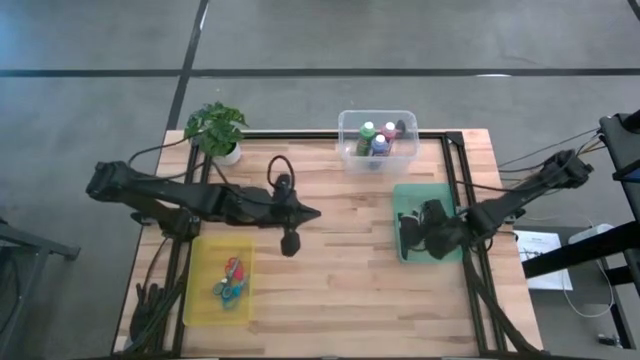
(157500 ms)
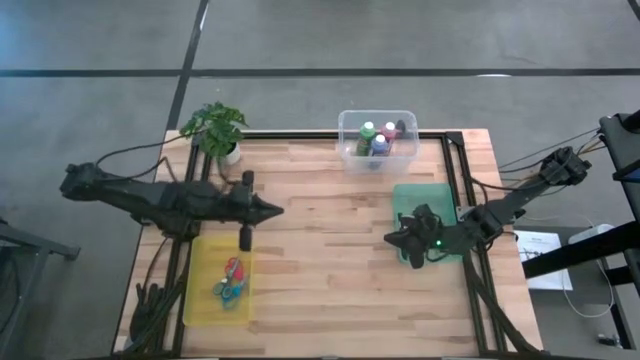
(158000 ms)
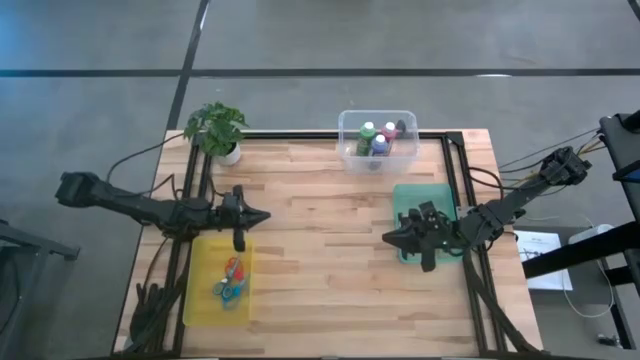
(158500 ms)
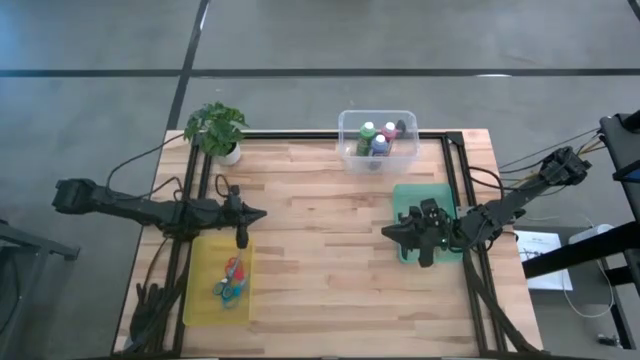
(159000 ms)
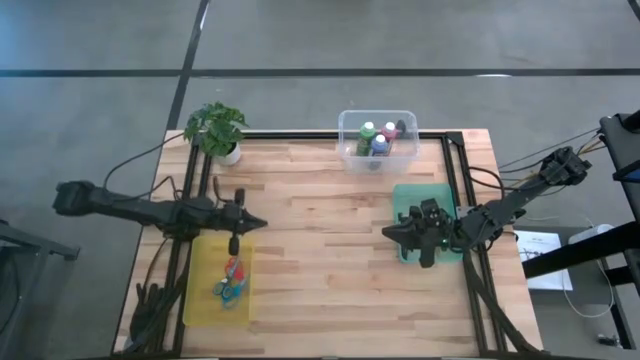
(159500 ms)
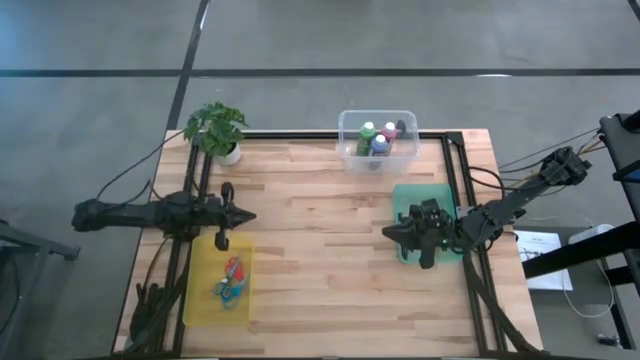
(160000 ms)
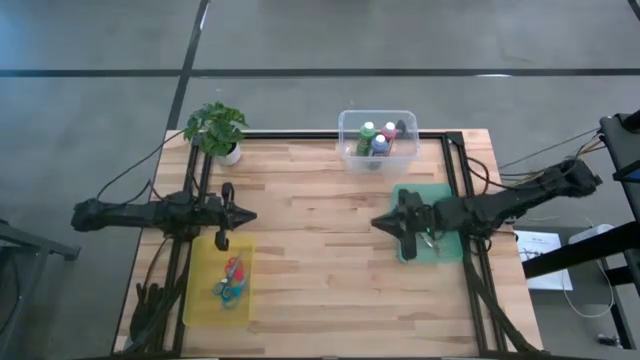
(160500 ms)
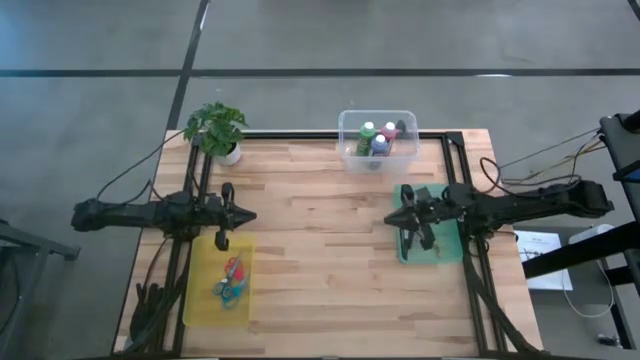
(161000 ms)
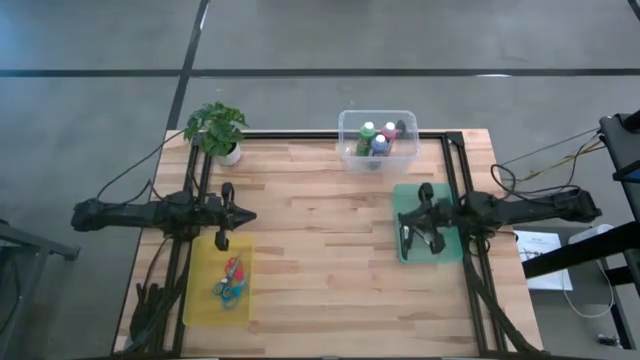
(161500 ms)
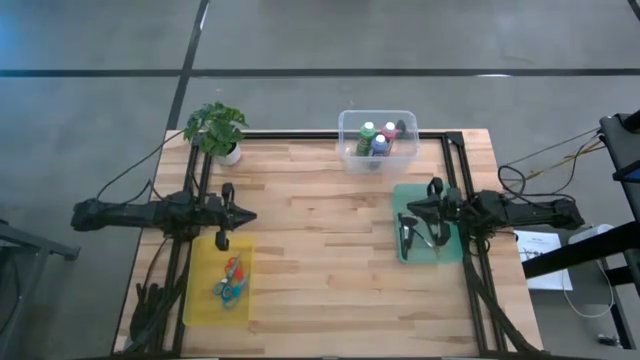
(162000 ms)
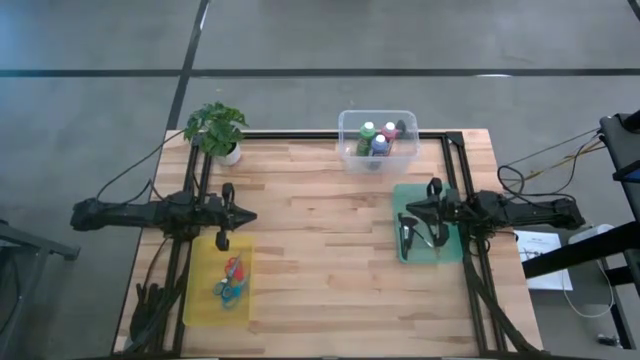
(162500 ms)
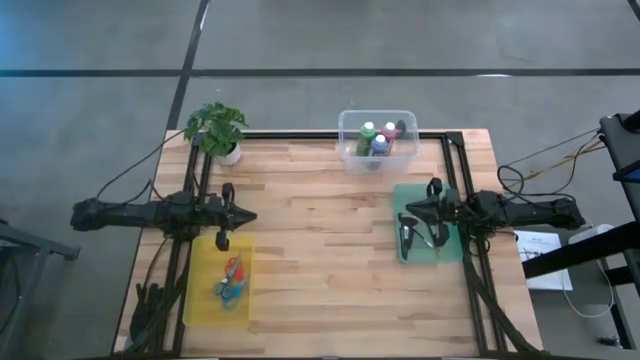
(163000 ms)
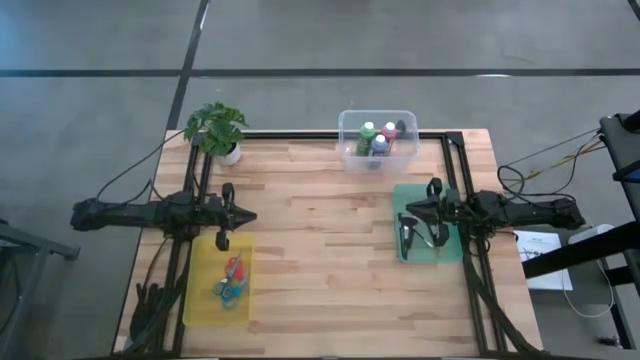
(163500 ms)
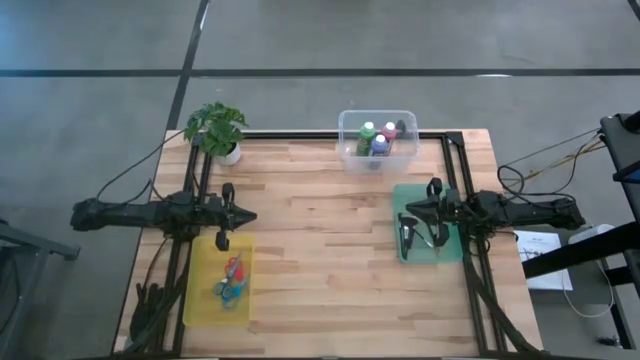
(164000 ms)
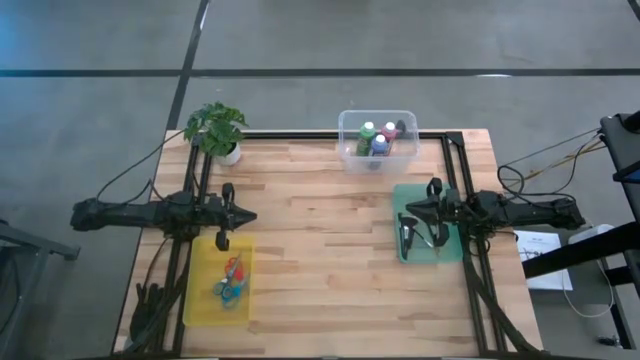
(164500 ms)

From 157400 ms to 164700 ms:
Task: Pick & Place Paint Supplies
Return to Home Position

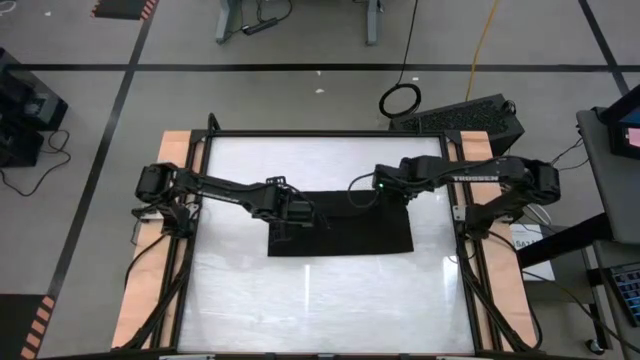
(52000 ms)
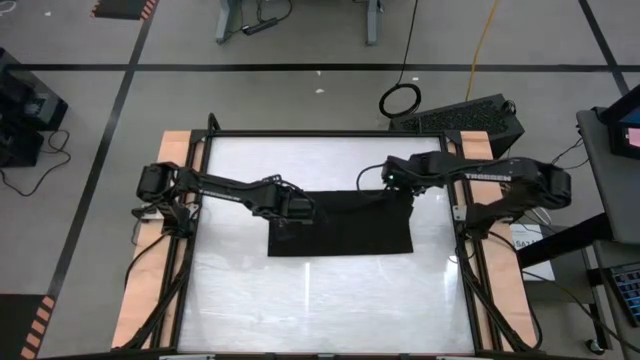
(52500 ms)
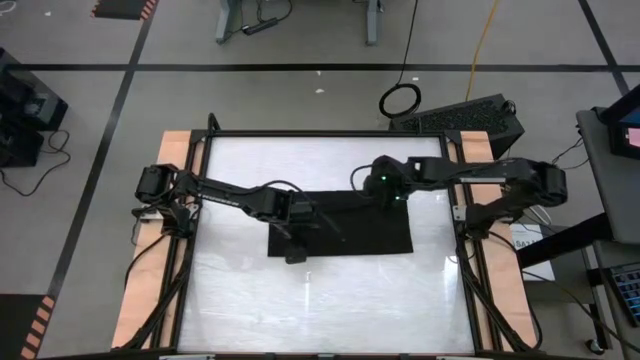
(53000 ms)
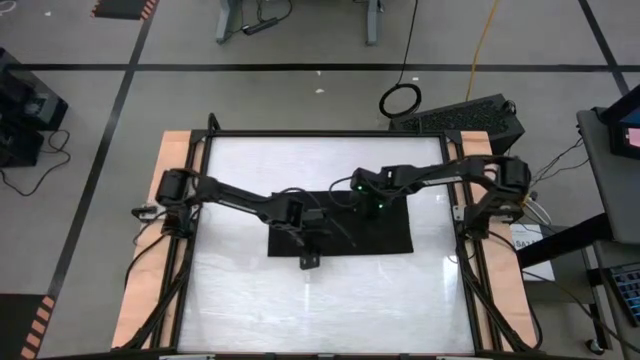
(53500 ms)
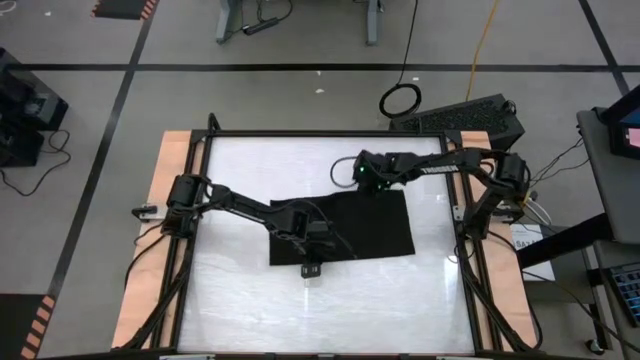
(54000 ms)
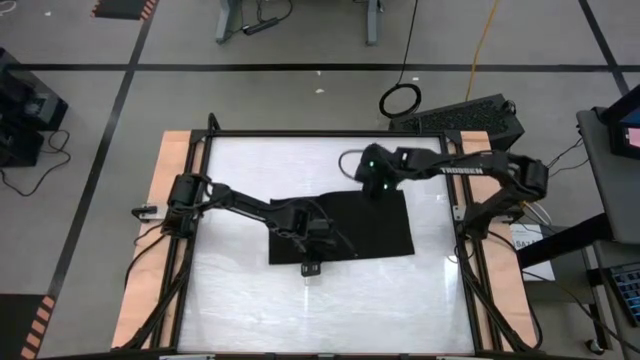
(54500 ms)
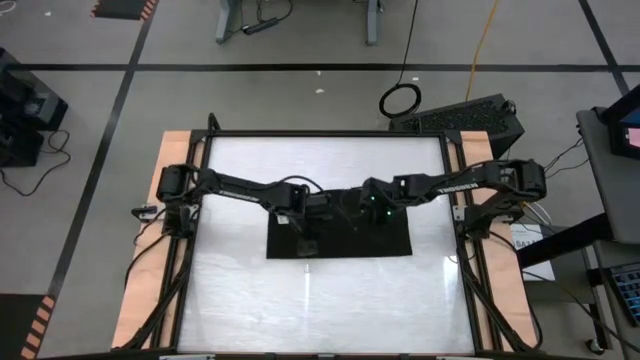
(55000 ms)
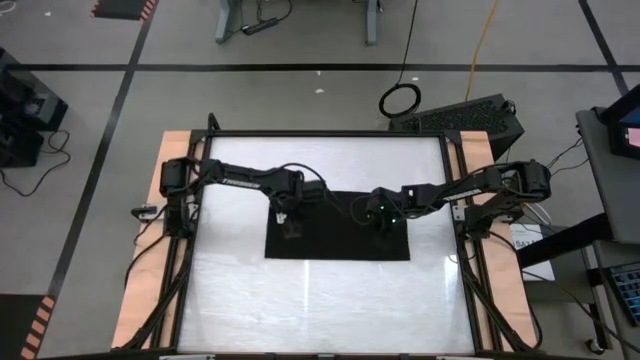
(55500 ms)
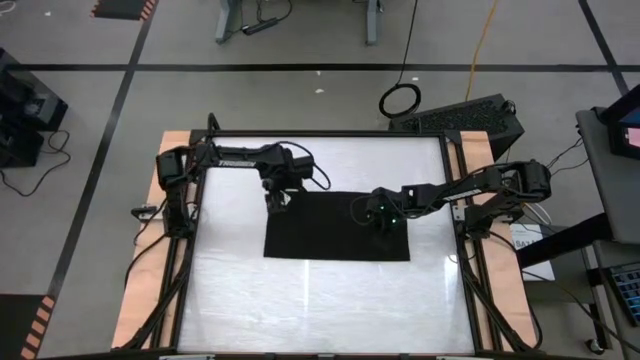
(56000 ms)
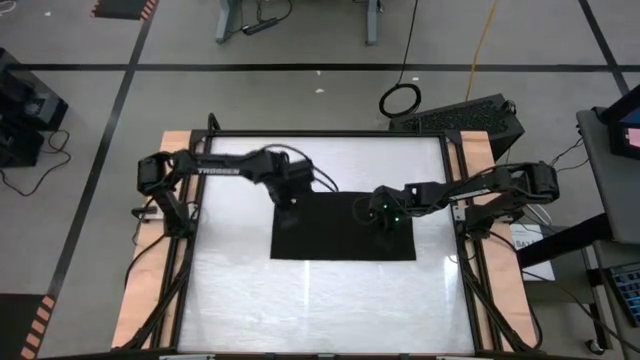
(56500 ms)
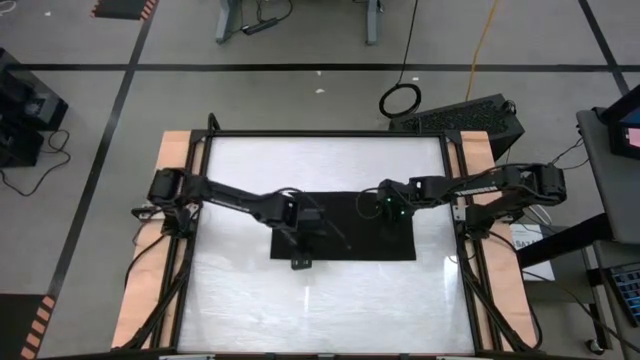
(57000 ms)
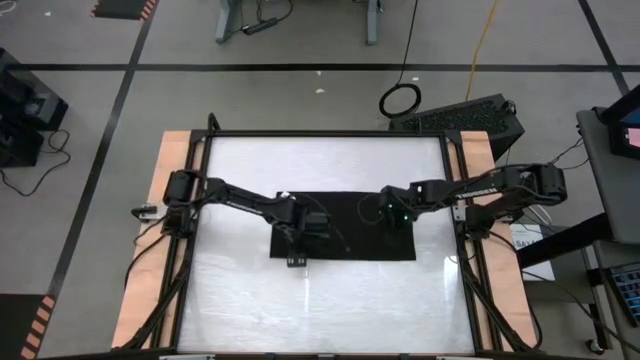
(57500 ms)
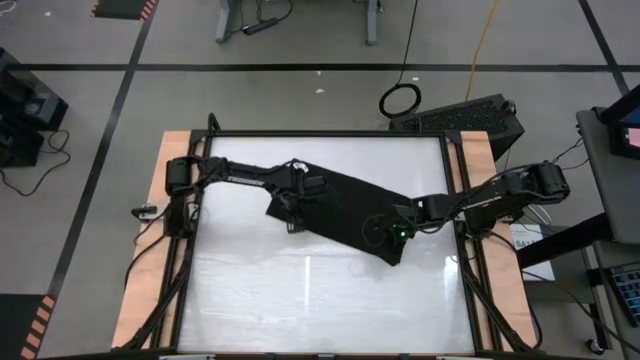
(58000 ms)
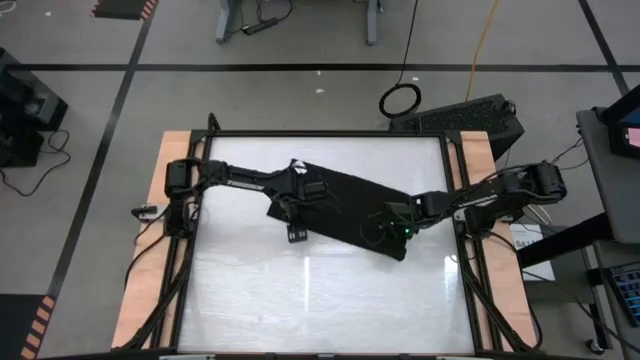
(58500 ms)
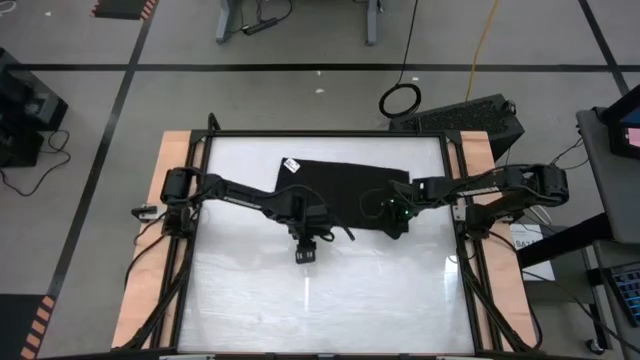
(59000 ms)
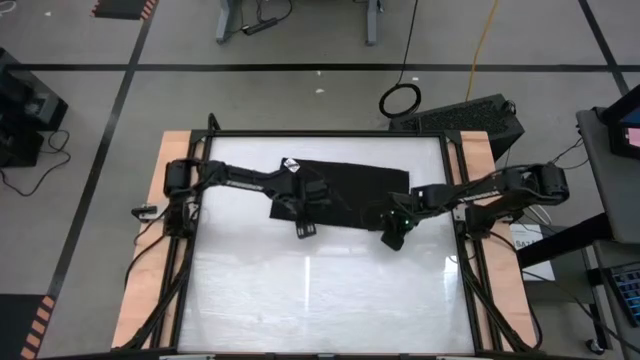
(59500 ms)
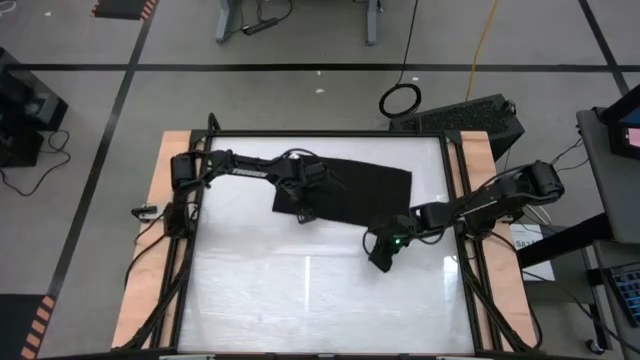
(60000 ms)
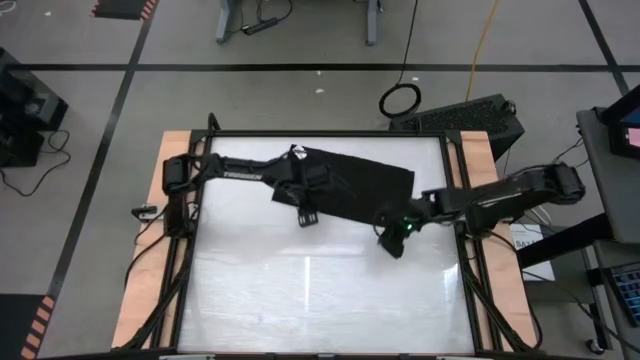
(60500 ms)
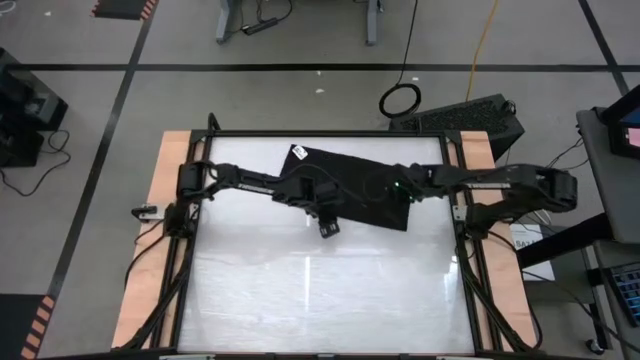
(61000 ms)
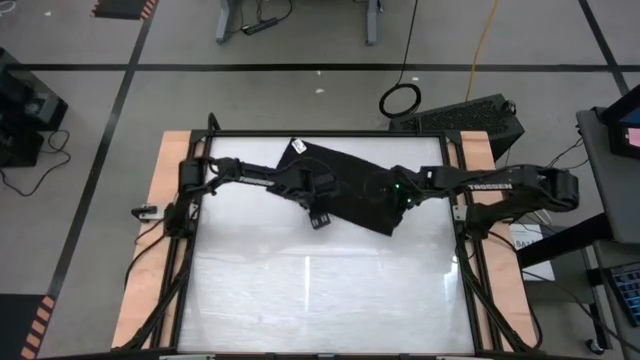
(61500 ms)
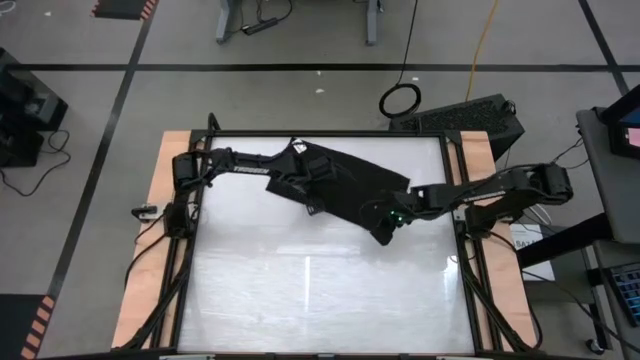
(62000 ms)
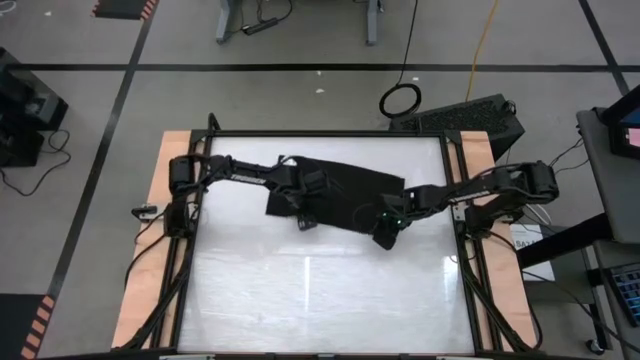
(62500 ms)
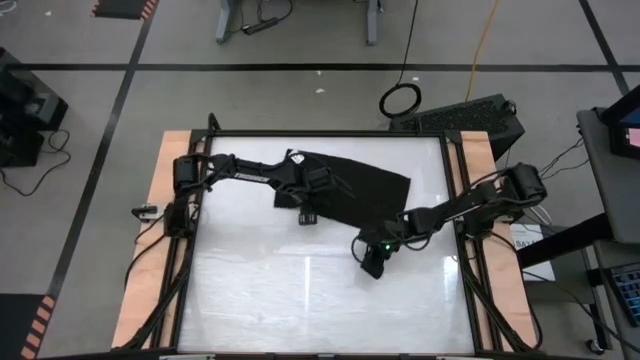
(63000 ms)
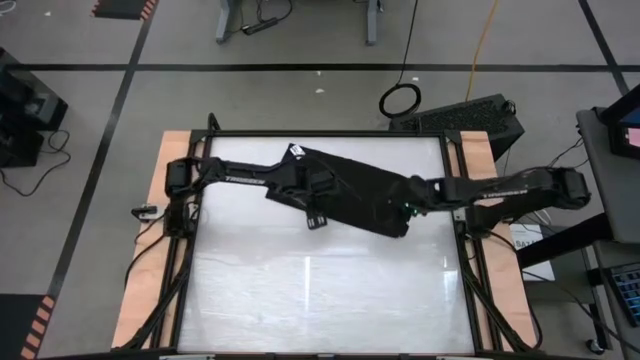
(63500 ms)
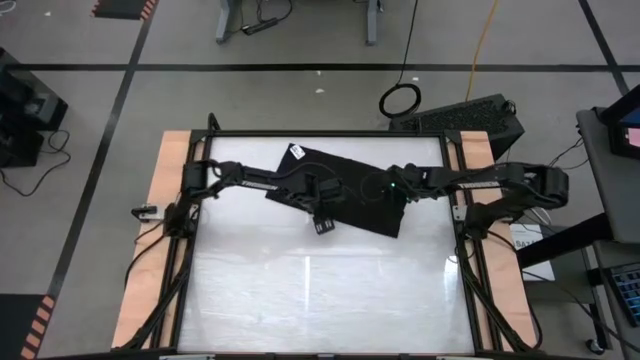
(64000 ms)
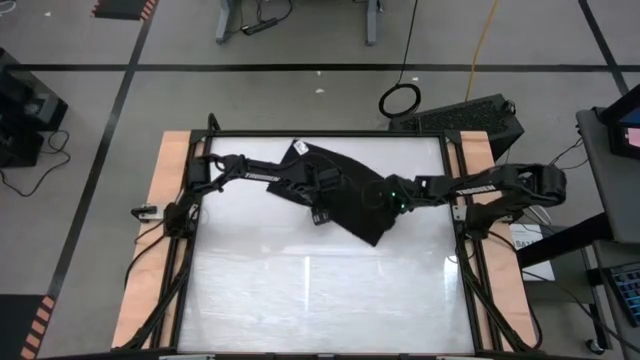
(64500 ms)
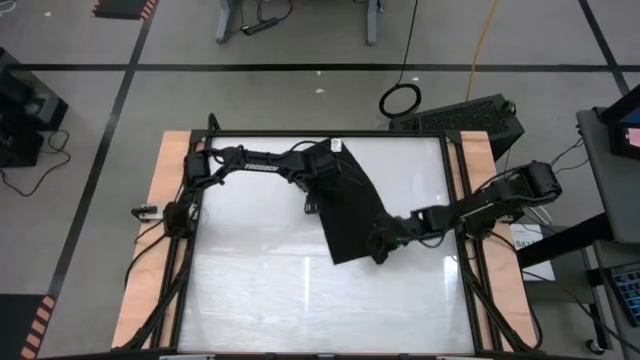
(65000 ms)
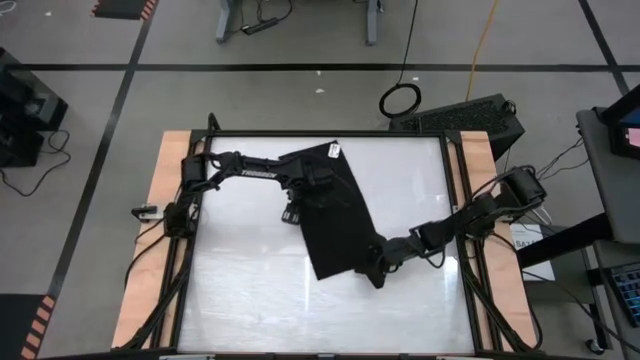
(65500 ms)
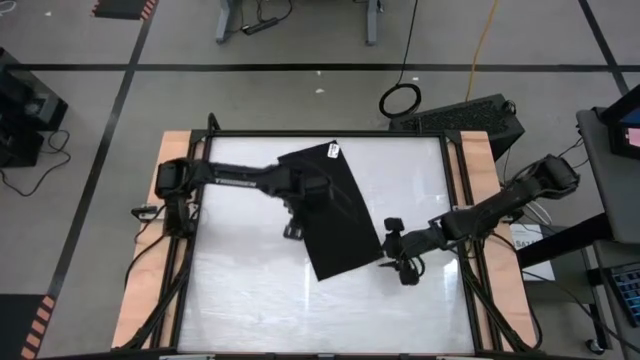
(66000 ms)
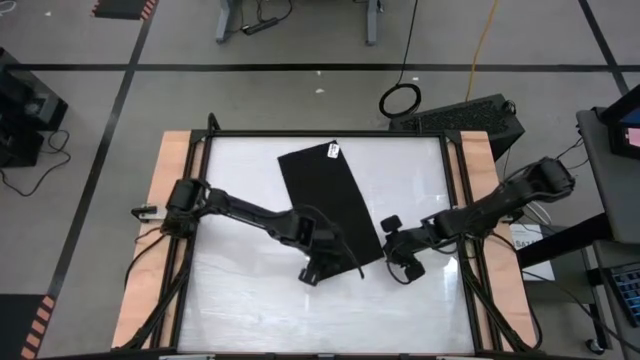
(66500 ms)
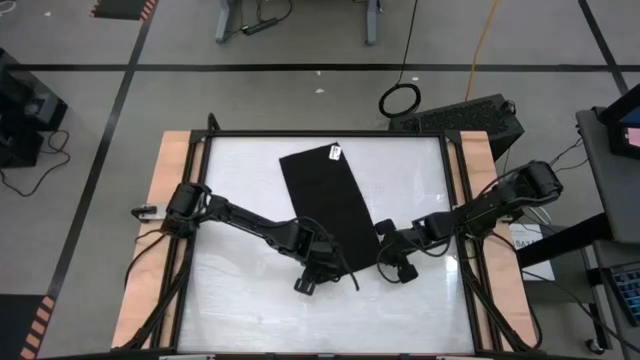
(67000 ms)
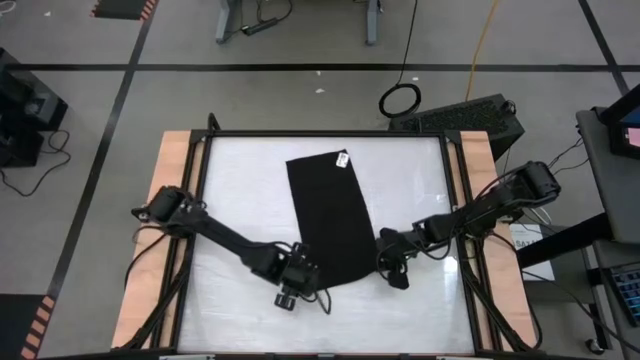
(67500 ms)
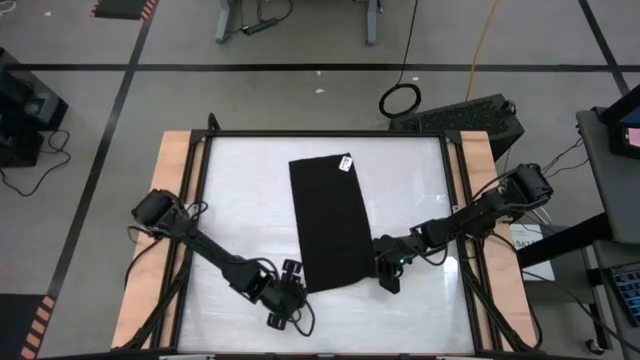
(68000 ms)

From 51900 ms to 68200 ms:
Task: Roll towel into tight, uniform cylinder
Fold the black towel
